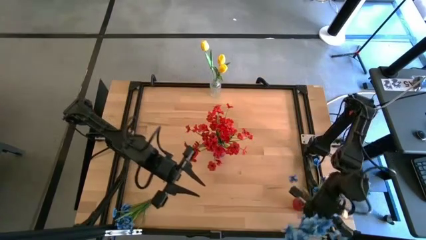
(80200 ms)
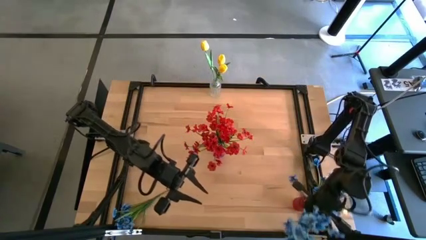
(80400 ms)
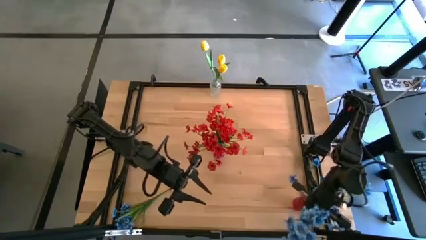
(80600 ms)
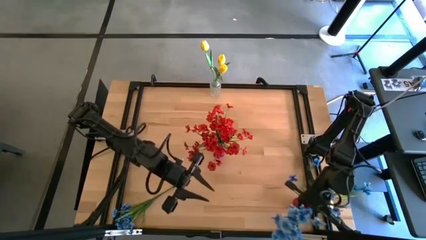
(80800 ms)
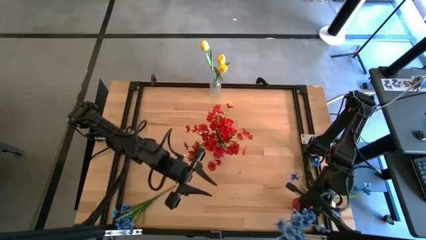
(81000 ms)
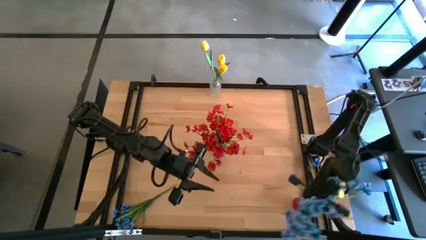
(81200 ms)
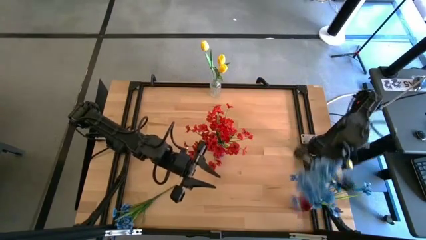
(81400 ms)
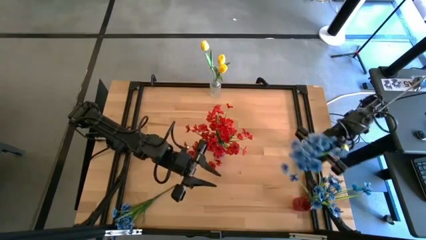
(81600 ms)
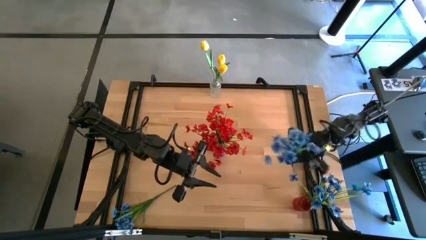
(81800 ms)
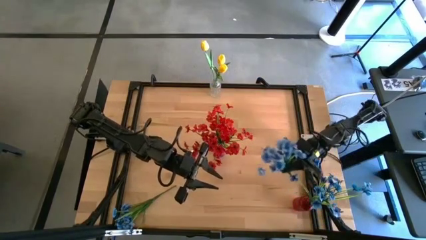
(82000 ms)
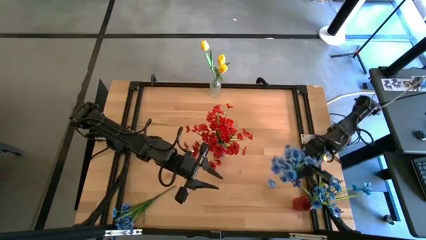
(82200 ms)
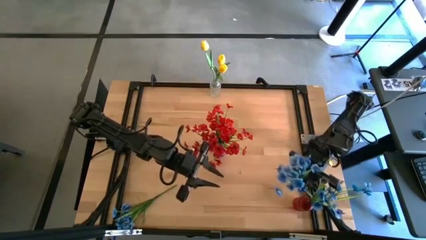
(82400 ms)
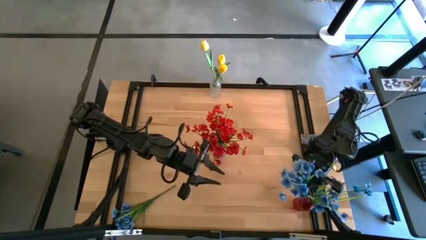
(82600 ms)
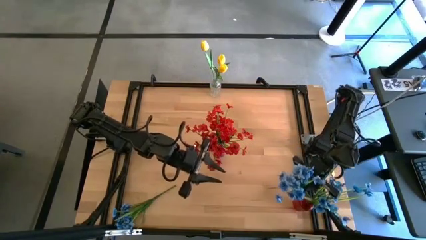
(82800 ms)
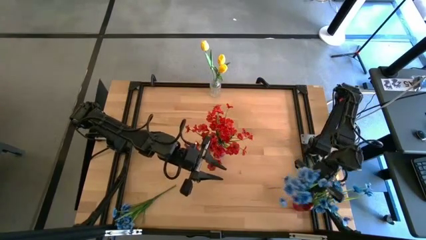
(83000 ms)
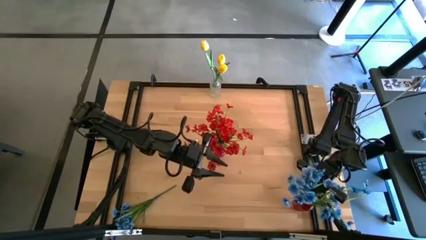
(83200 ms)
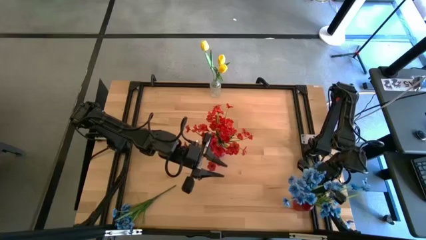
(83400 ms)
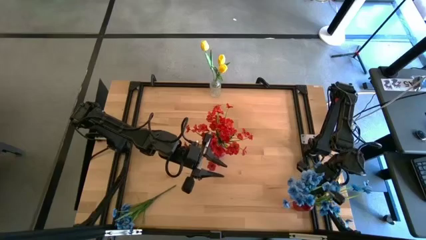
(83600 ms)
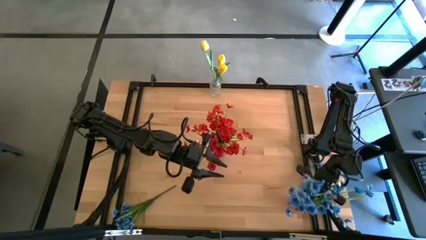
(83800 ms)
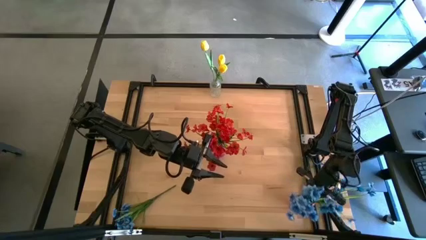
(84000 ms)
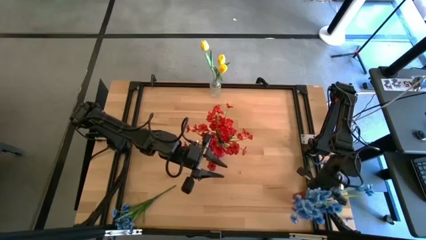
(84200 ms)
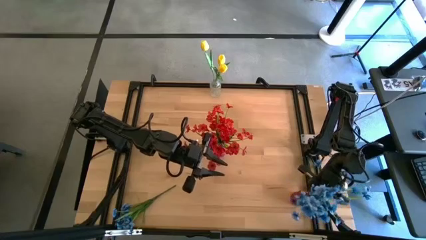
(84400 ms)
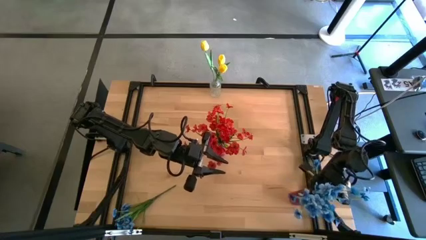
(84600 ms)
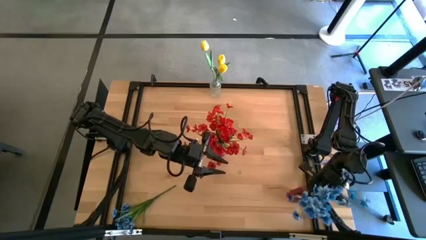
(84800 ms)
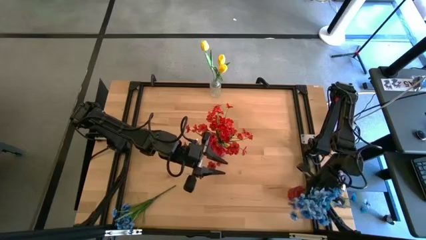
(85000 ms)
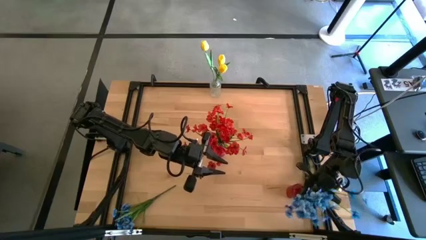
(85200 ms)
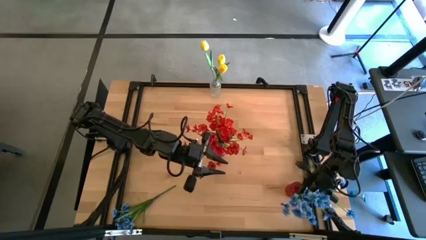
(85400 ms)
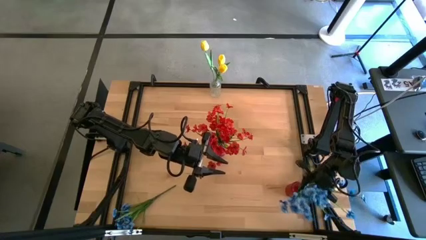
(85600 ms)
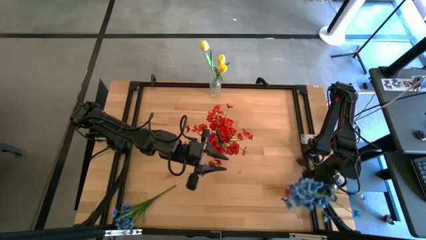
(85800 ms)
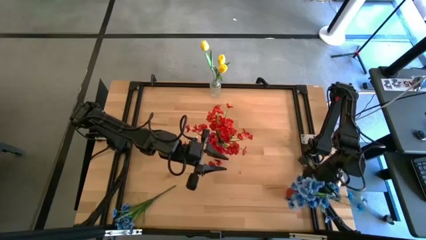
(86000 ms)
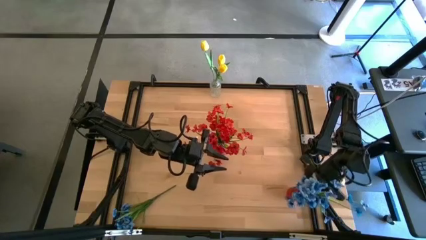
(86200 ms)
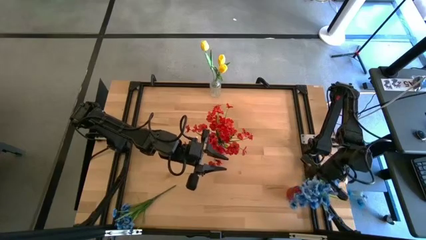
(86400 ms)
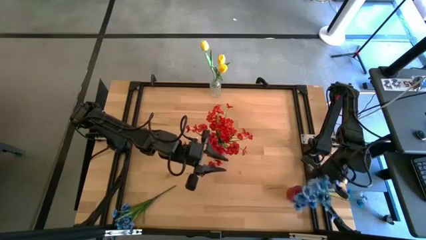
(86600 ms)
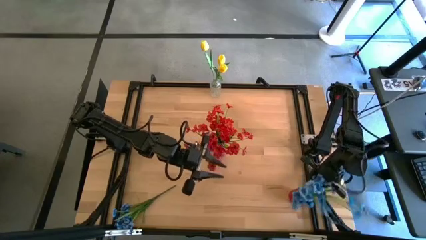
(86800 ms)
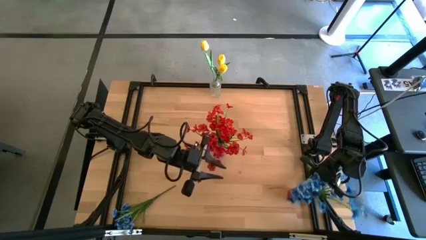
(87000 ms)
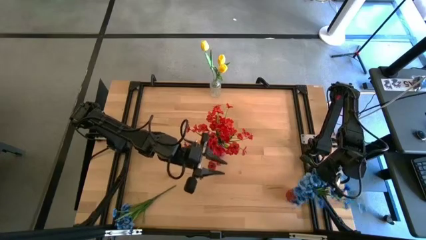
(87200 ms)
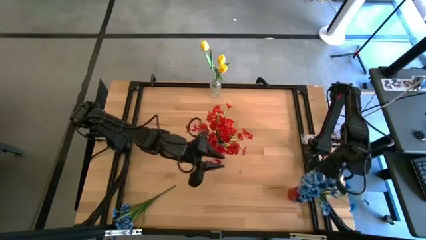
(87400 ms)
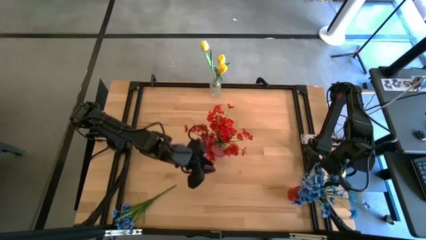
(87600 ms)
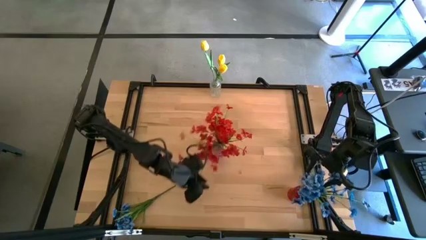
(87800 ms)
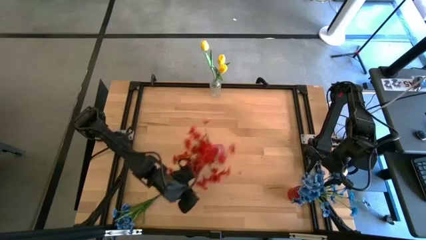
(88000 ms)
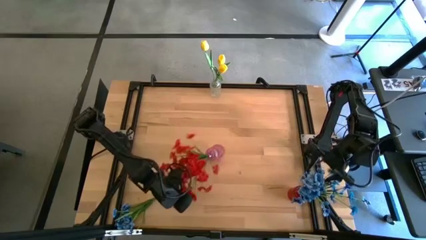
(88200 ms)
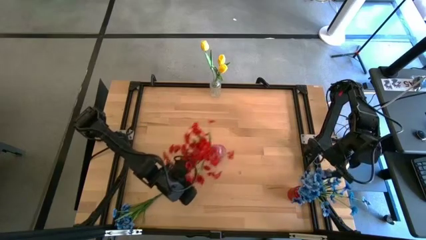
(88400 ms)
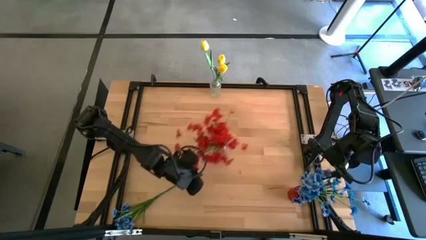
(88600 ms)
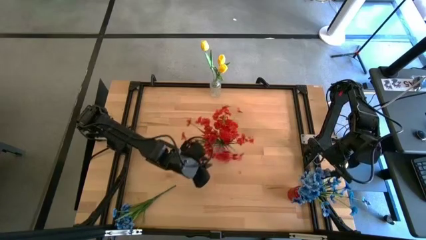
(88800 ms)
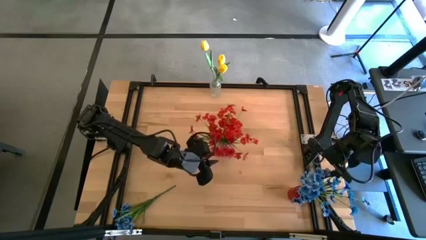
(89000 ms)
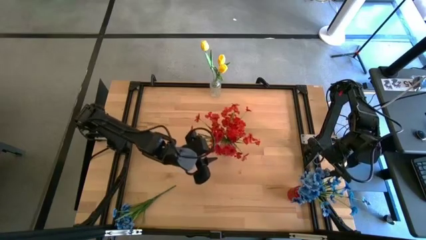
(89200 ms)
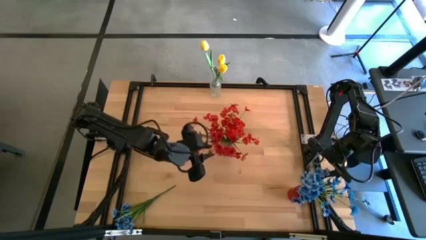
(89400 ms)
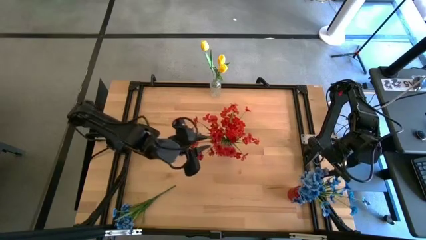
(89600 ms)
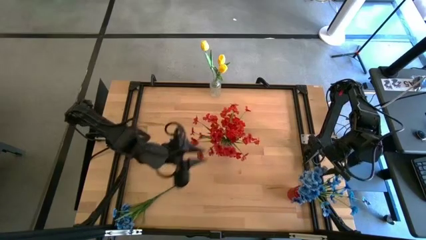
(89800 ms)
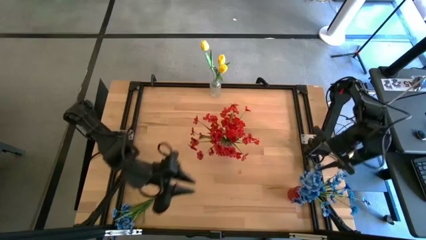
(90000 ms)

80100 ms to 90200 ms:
Task: Sort flowers into vase by color
Put the top blue flowers into the red vase

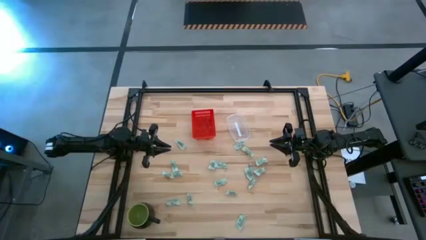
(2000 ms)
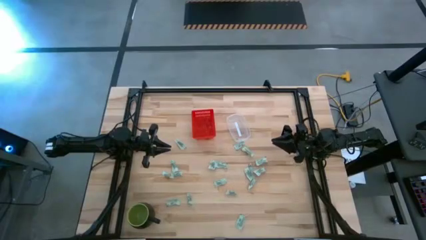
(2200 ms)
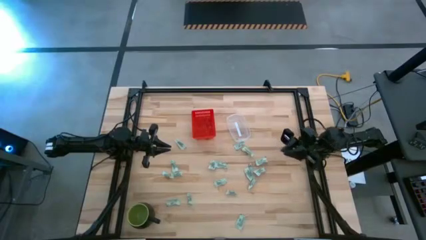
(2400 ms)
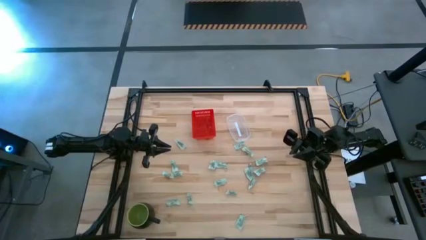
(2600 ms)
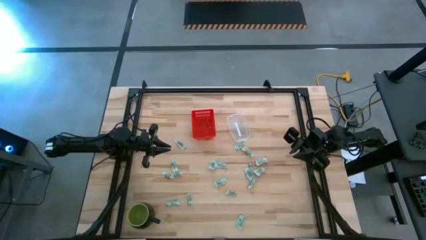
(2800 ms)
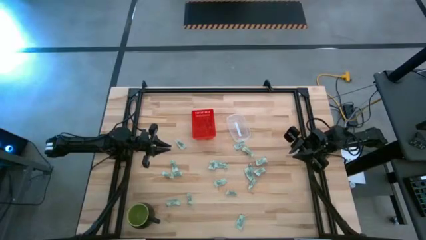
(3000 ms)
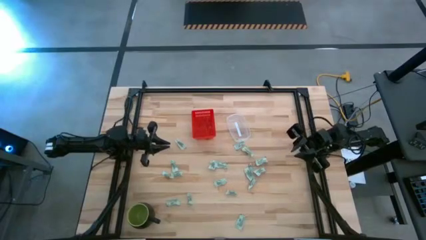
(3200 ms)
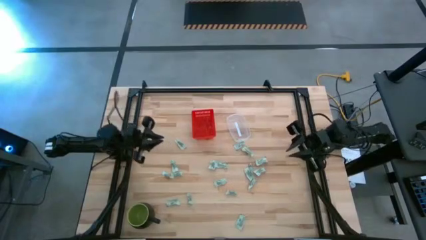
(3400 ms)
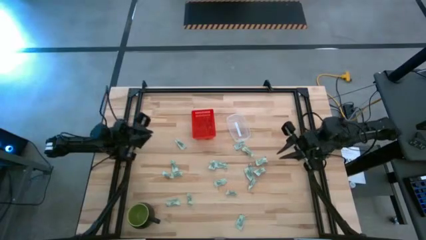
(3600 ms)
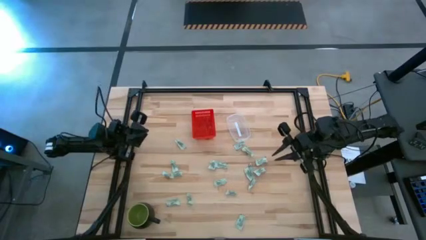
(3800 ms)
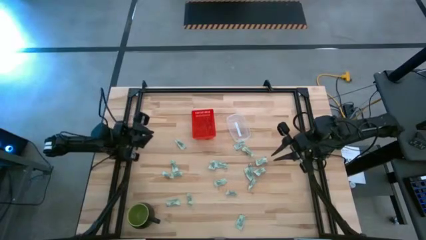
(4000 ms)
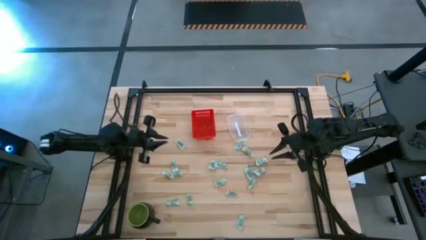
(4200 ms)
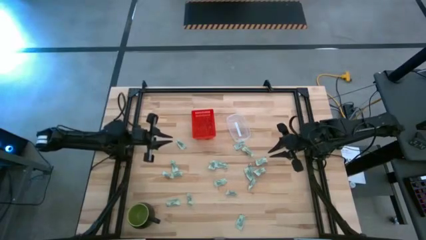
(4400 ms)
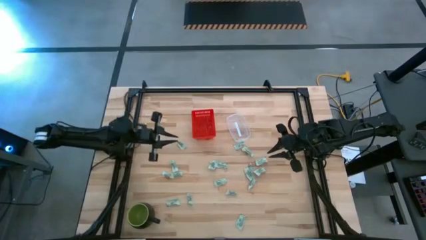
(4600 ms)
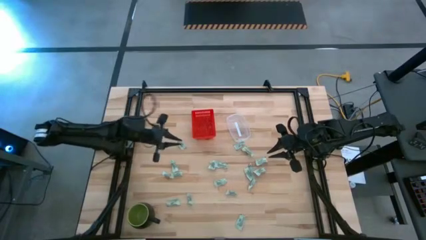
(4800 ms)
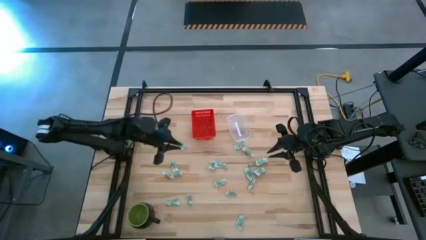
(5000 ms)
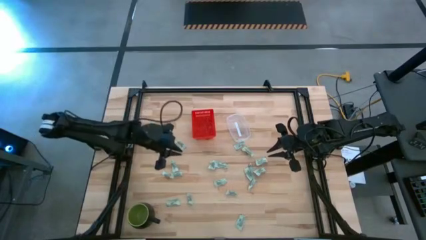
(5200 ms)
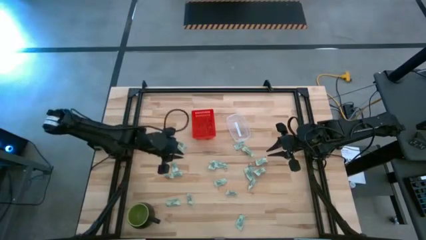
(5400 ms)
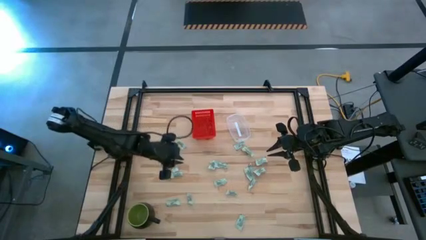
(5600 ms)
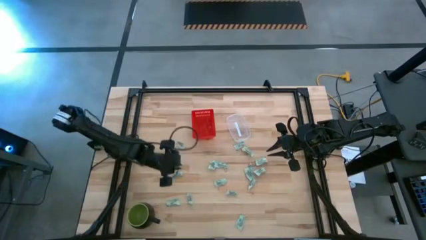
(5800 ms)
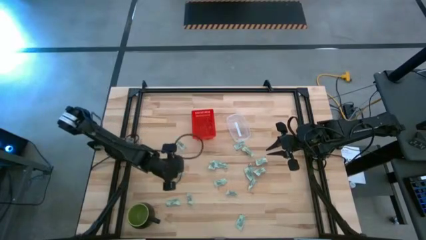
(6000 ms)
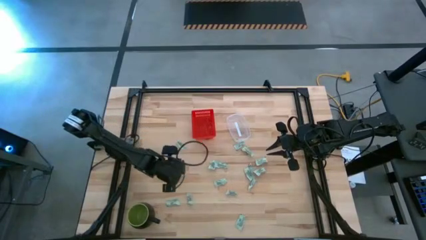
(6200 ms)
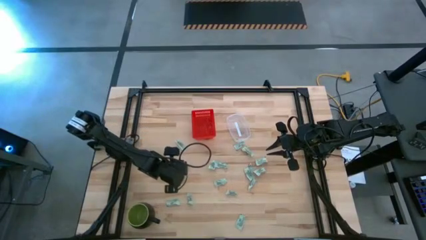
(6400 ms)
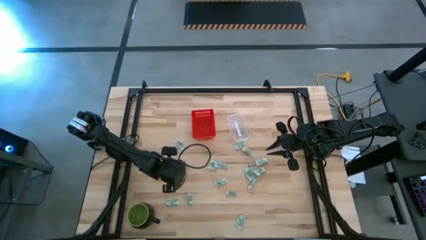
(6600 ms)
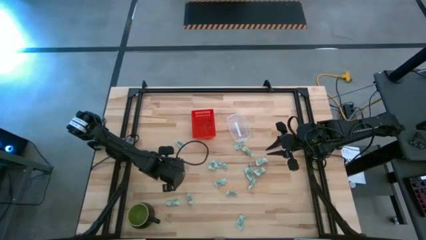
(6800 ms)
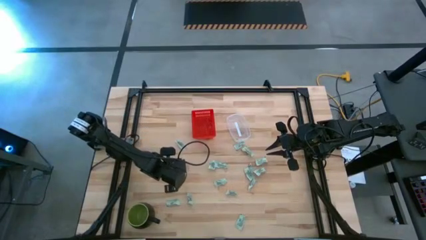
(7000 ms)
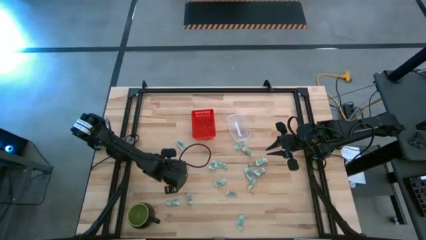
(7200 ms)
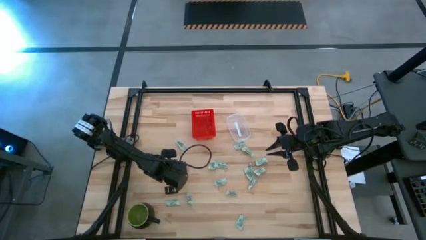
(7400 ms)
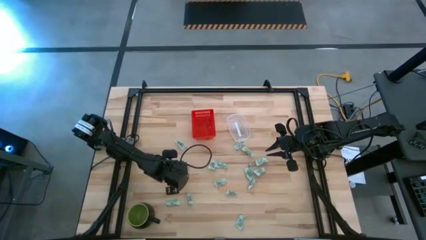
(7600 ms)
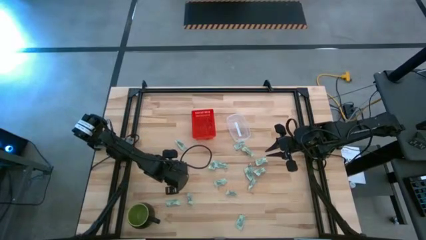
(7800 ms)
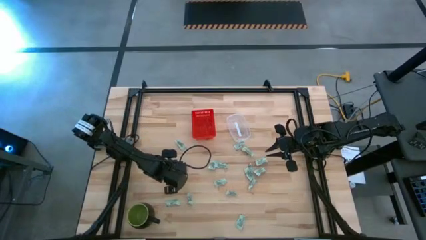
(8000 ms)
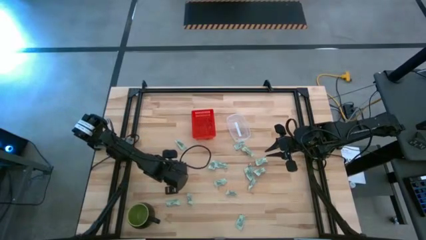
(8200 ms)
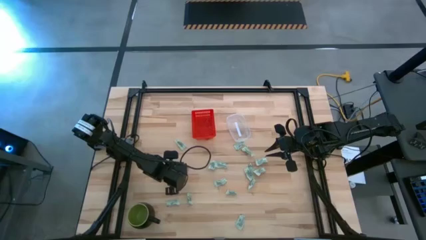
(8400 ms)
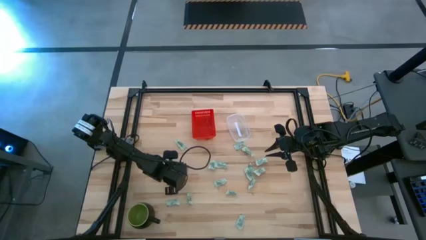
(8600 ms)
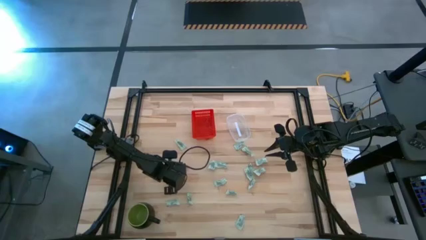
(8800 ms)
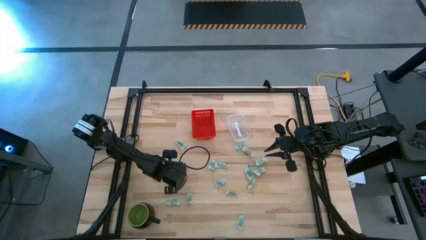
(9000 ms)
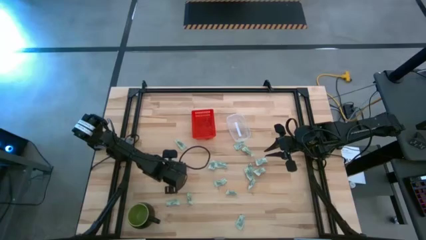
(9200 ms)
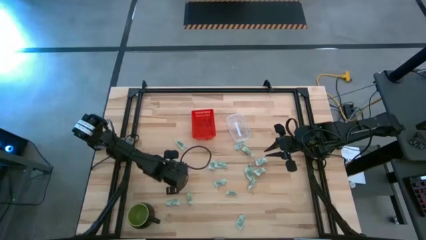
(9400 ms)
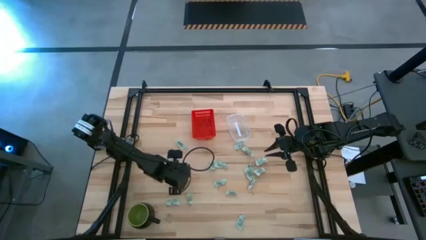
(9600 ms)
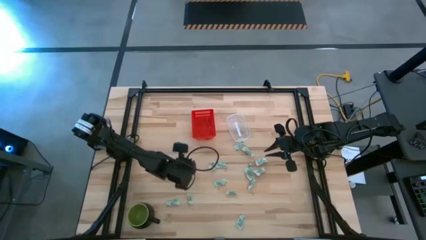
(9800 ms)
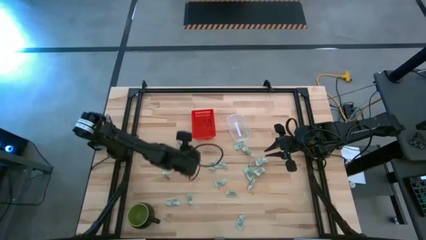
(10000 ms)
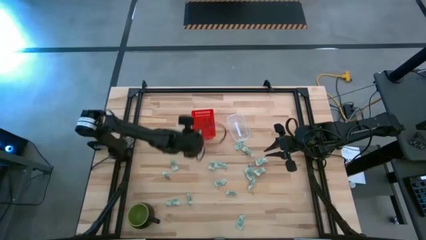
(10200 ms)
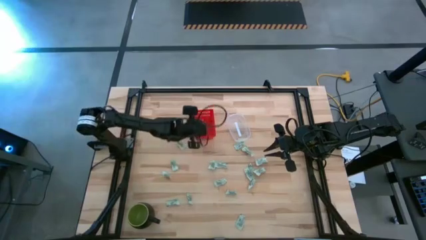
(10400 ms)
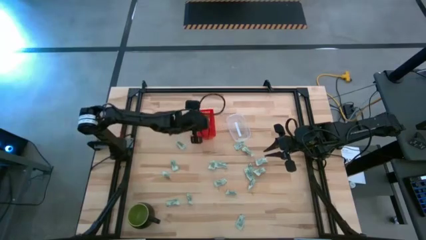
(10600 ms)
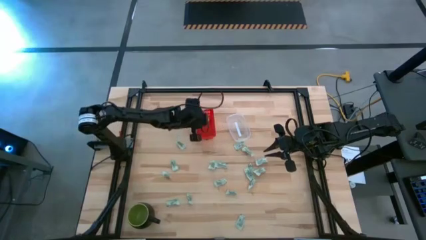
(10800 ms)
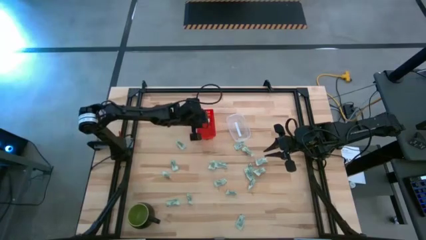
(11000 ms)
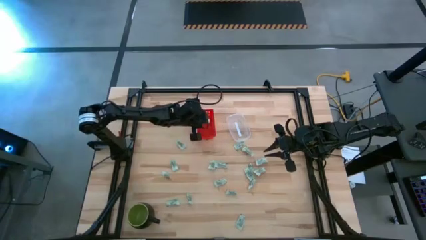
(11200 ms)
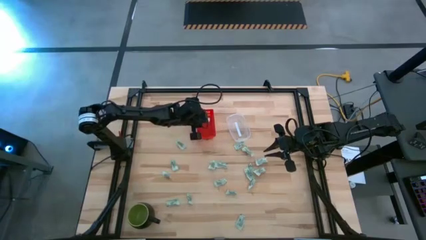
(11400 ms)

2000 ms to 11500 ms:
Task: Pick and place items into bin
Put the white stevia packet into the red bin
